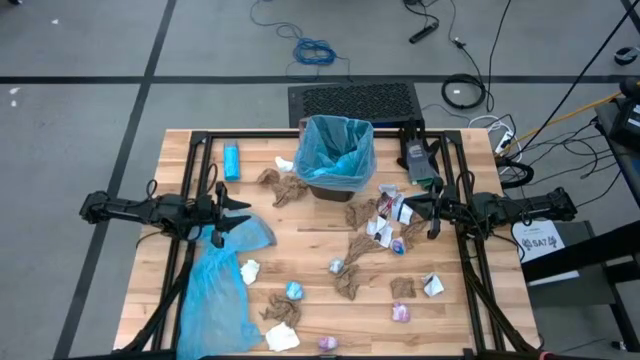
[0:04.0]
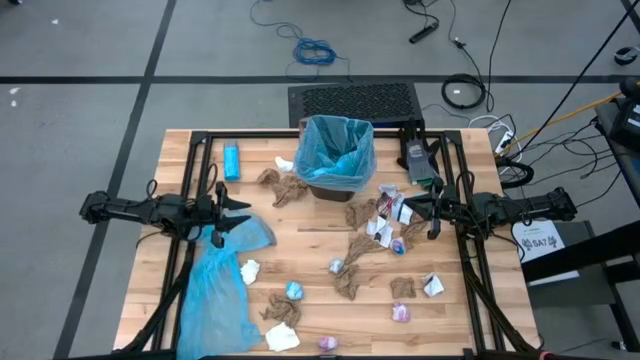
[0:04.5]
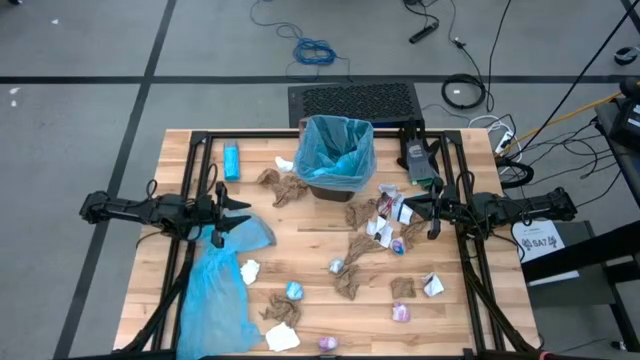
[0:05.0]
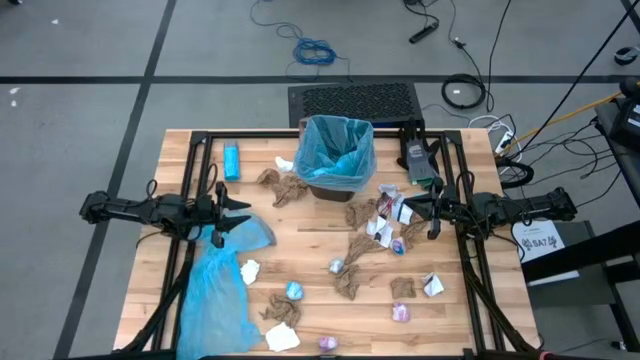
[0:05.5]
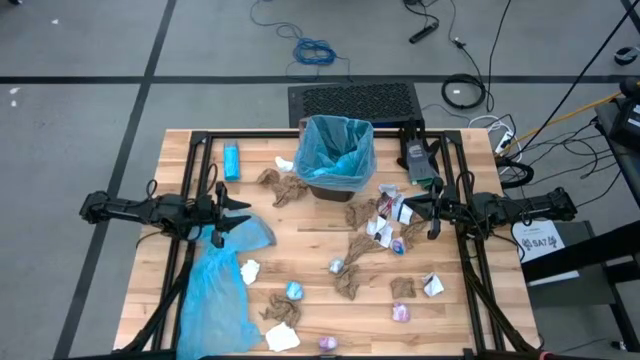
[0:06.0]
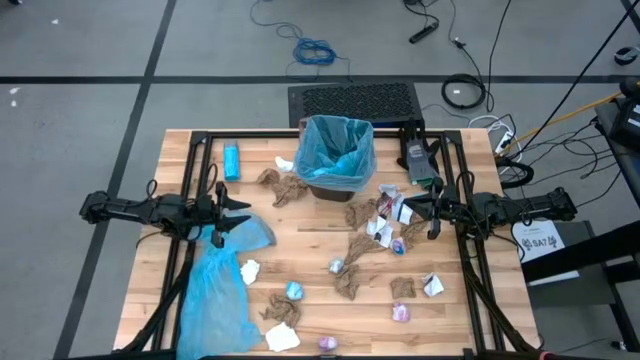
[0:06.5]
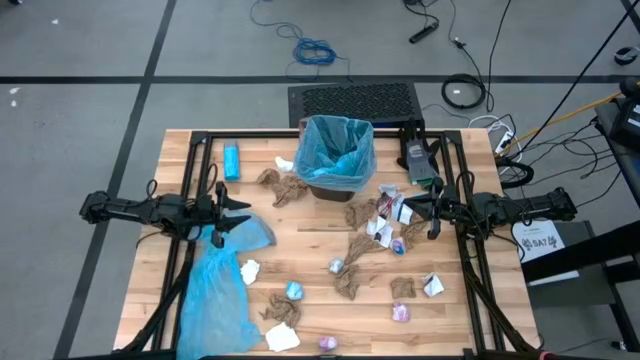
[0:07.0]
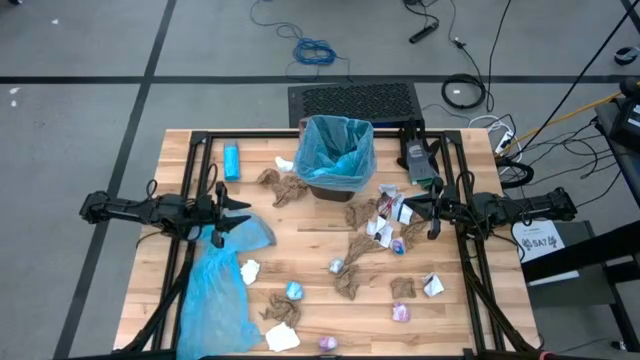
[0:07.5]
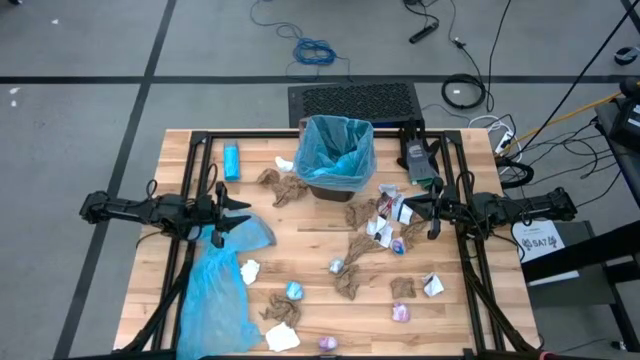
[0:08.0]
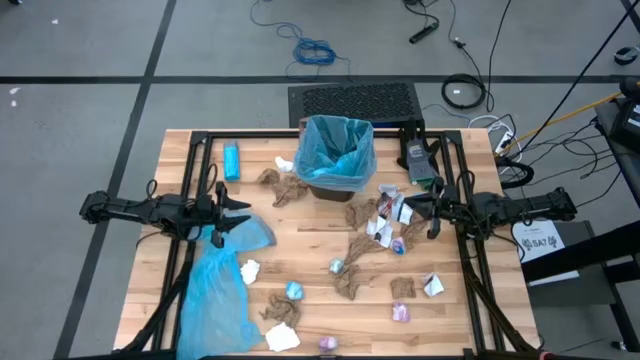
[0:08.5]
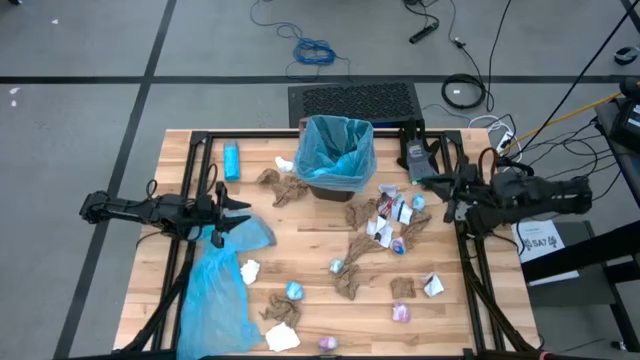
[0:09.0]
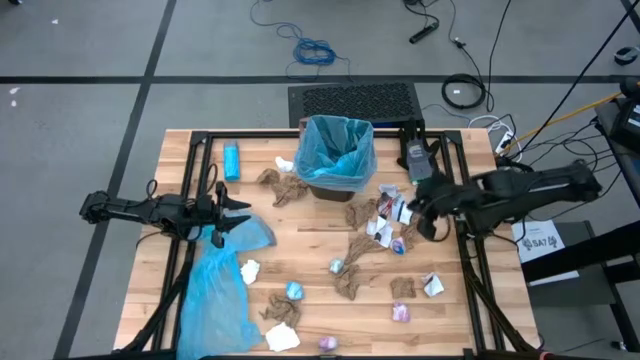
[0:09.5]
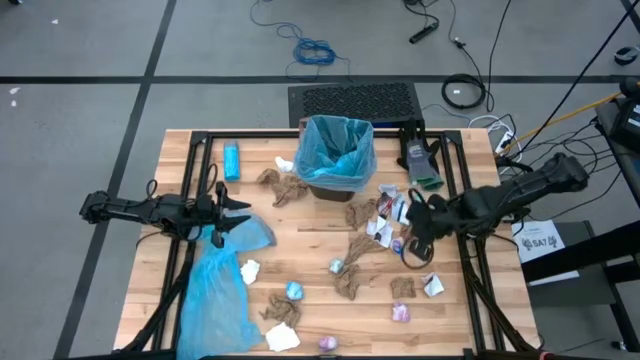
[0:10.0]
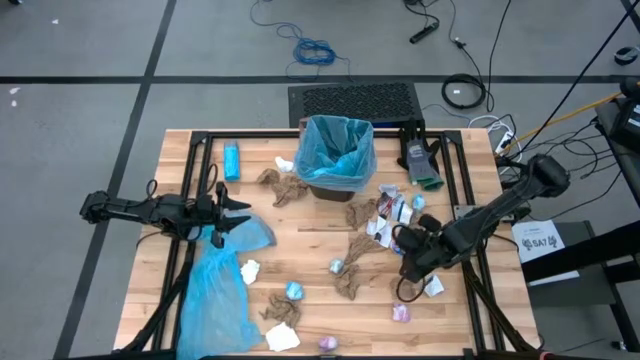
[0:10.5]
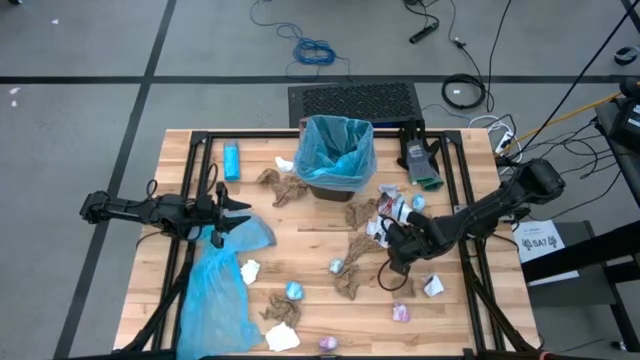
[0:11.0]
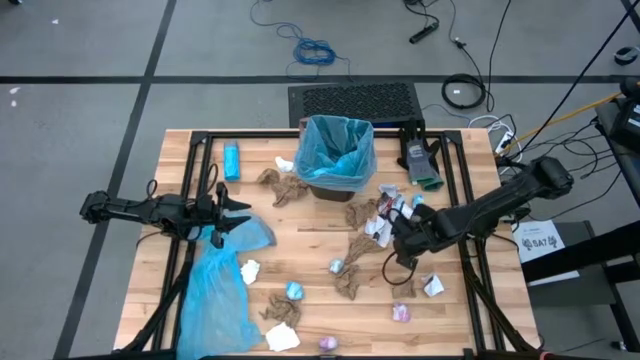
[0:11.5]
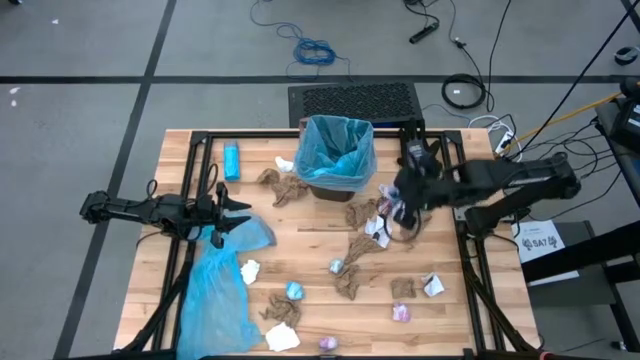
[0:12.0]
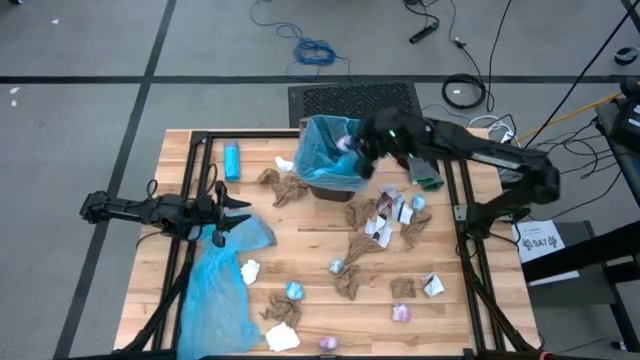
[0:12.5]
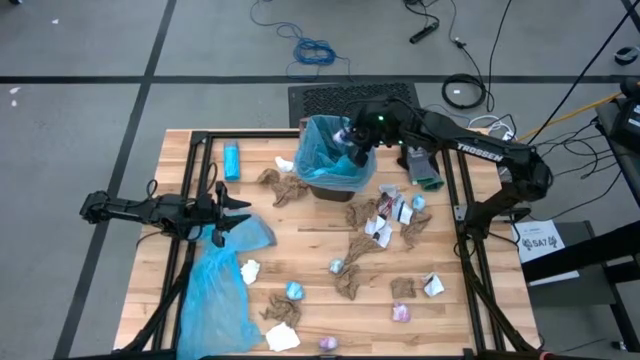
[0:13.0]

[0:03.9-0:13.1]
Task: place trash/remove bag and relplace
Put the pink plastic into the trash bin

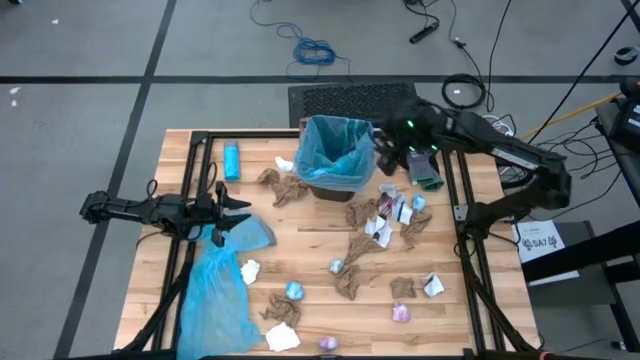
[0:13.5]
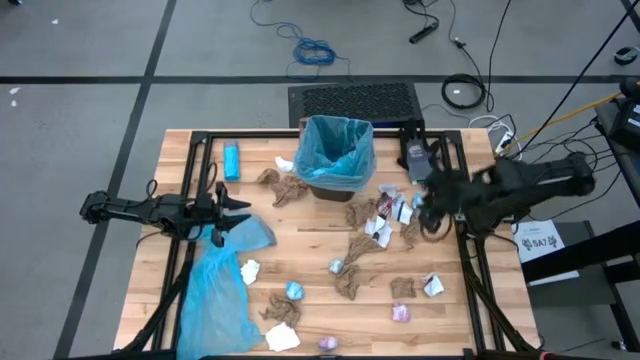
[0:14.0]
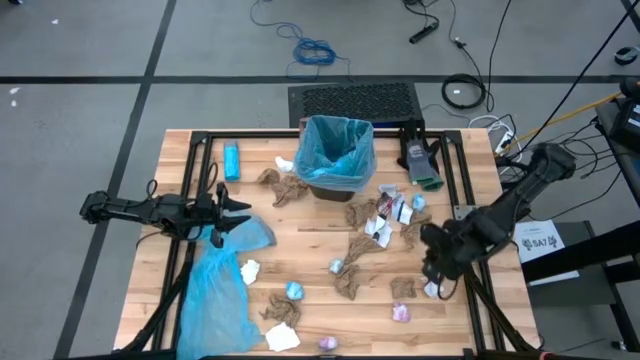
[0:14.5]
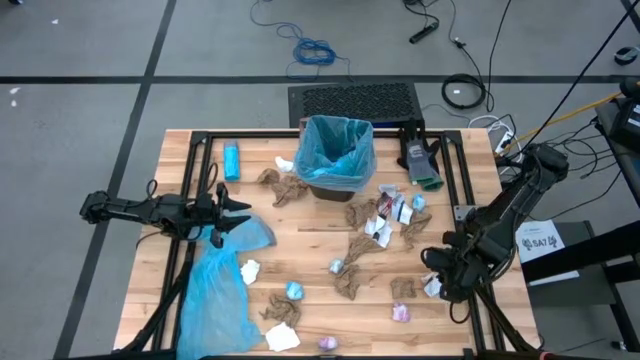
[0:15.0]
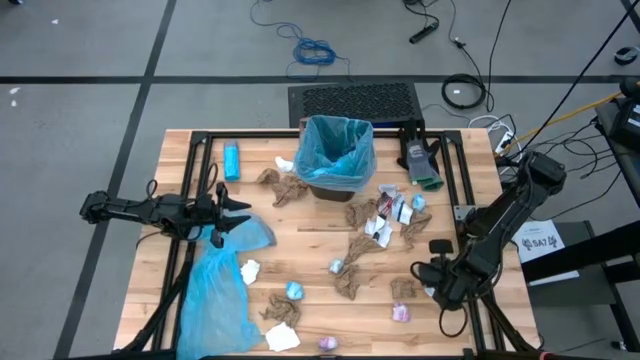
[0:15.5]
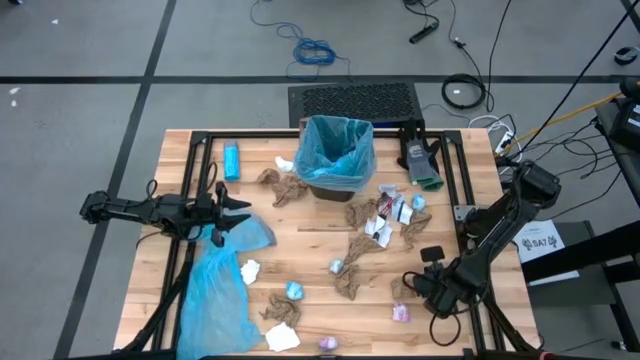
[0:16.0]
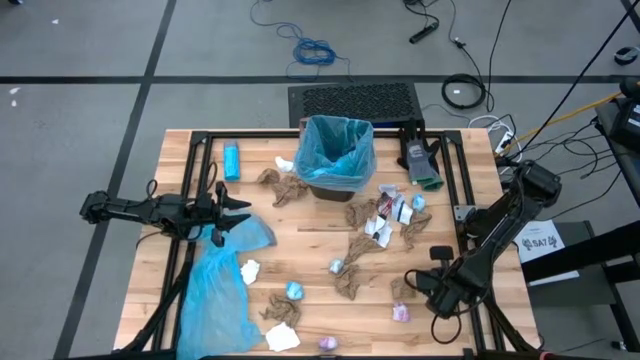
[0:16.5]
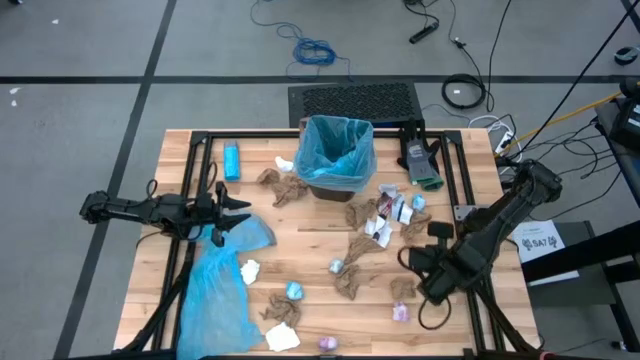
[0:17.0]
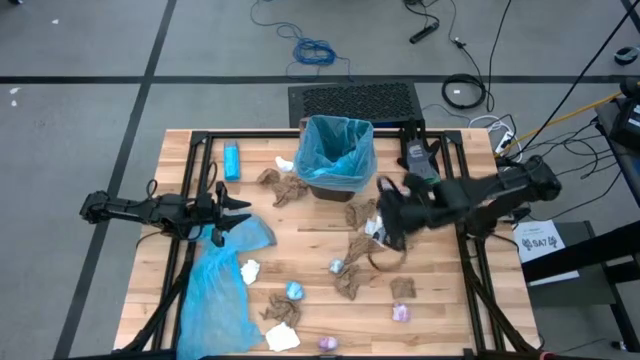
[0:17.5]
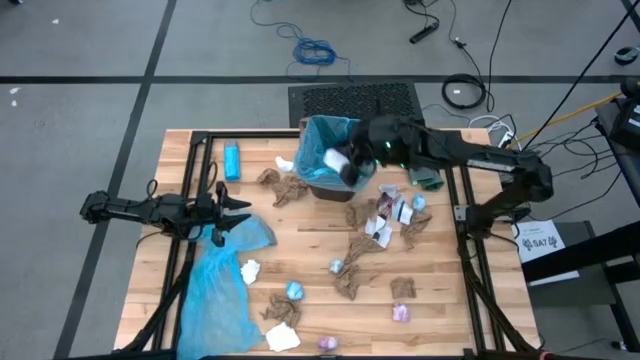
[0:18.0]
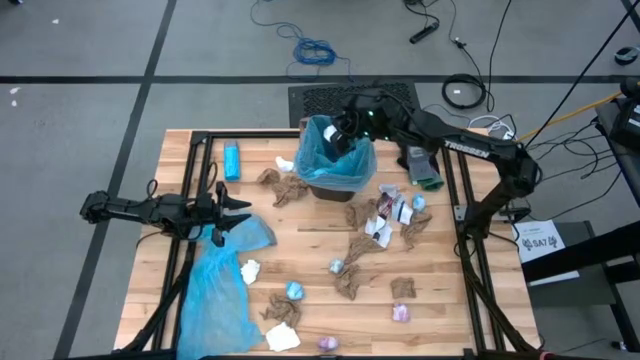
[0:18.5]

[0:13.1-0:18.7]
Put the white paper into the trash bin

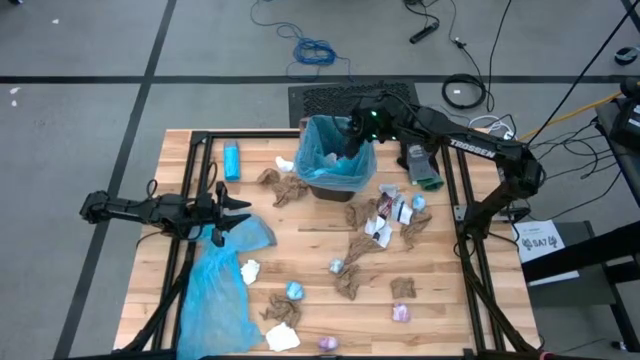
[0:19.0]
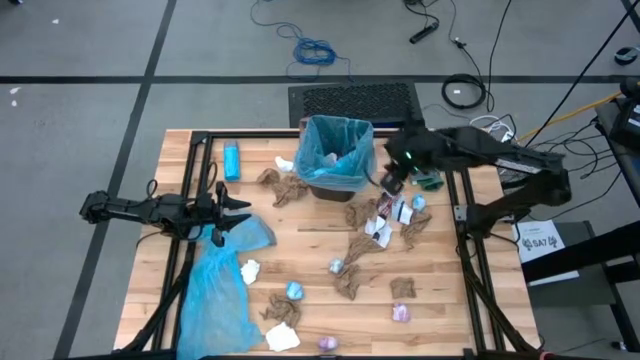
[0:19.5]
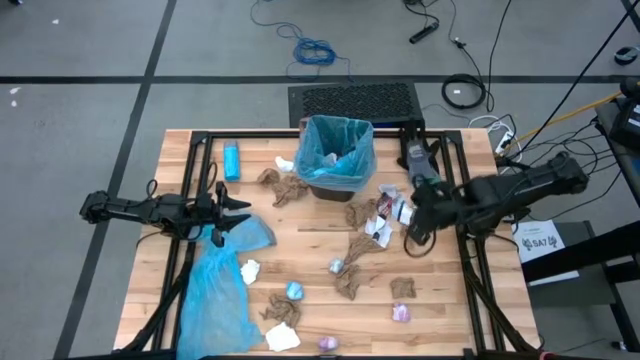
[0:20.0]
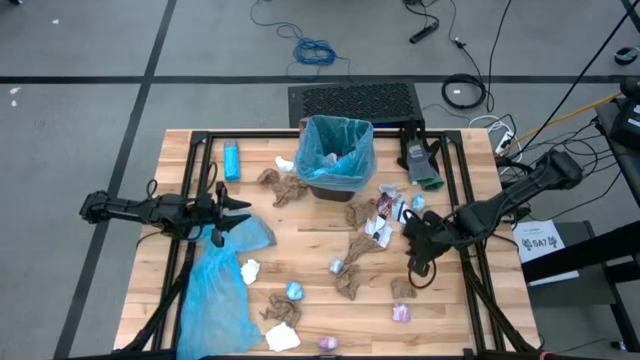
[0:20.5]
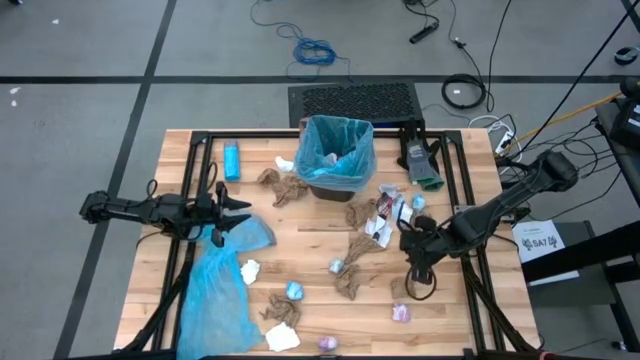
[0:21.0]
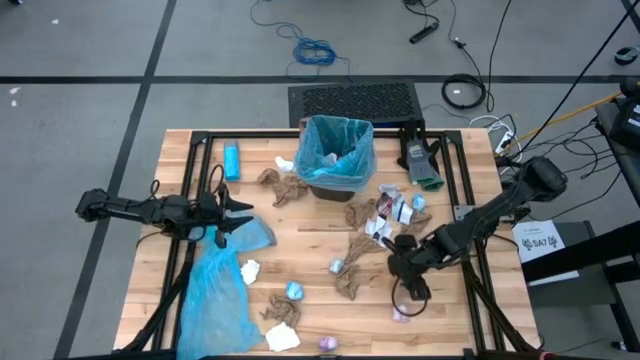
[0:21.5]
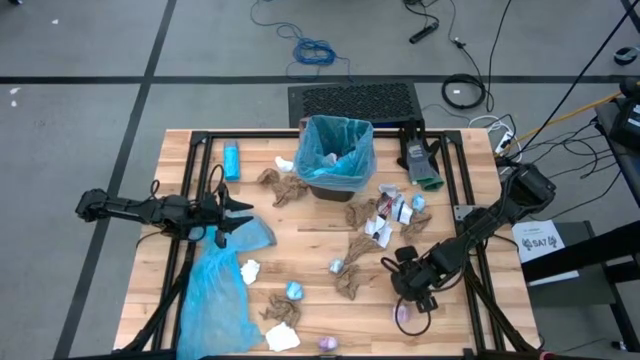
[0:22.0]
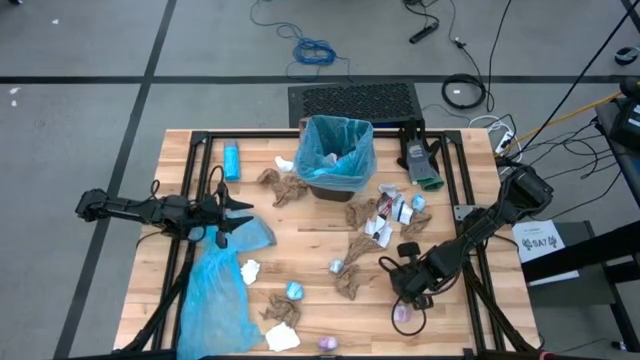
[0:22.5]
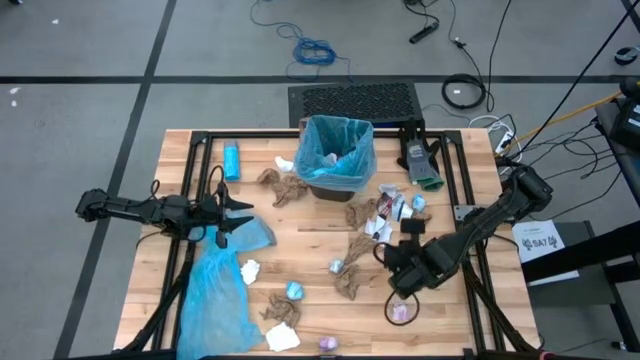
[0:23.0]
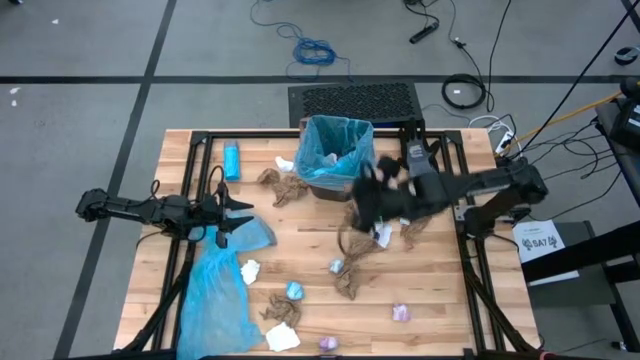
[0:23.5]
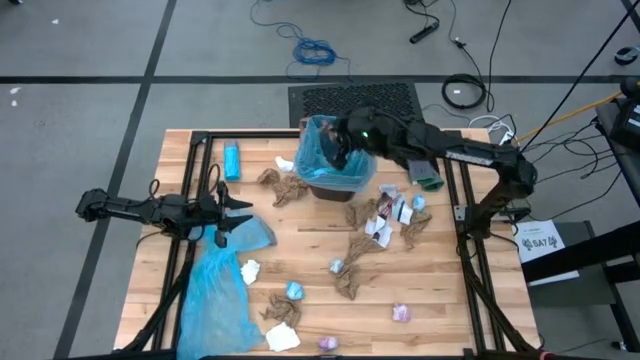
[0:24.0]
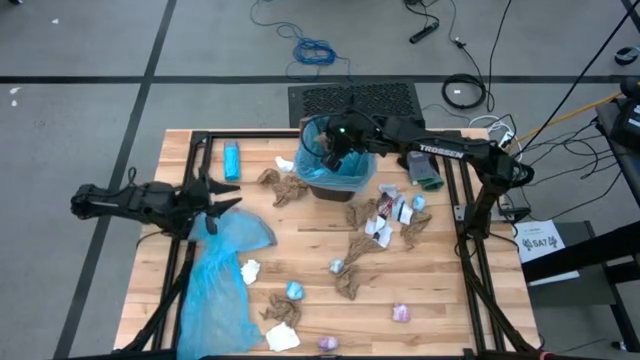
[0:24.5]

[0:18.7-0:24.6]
Put the brown paper into the trash bin
